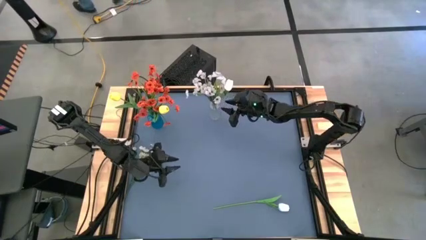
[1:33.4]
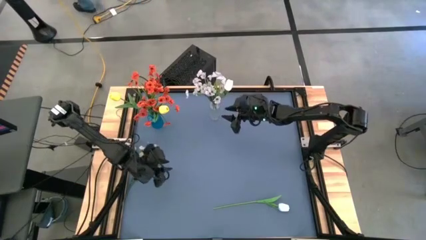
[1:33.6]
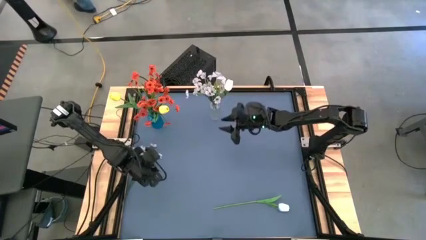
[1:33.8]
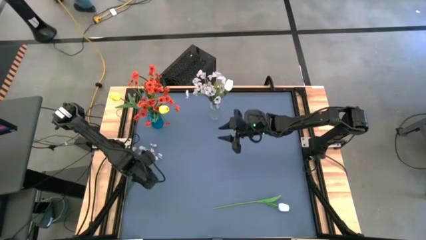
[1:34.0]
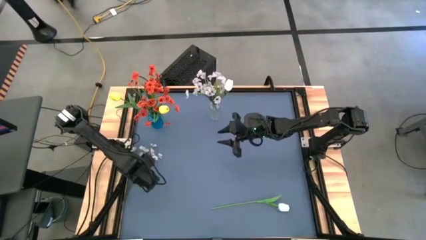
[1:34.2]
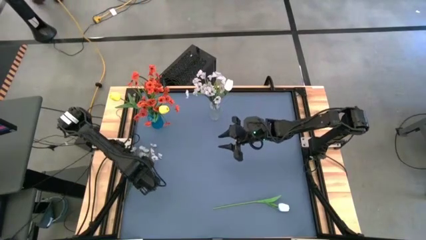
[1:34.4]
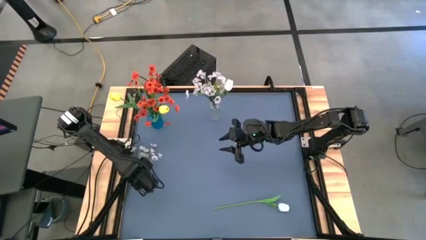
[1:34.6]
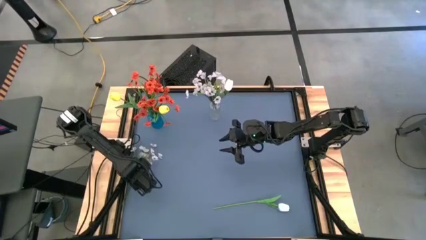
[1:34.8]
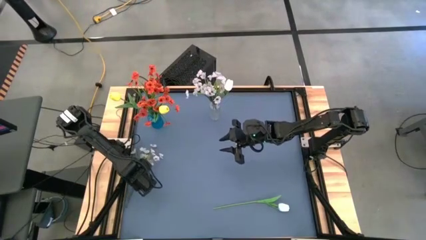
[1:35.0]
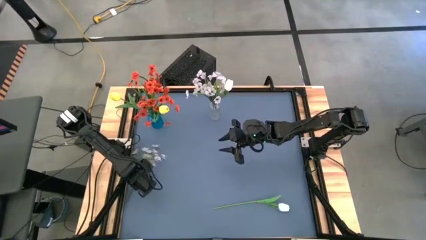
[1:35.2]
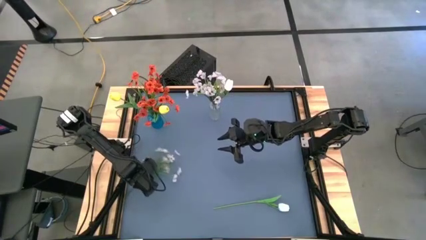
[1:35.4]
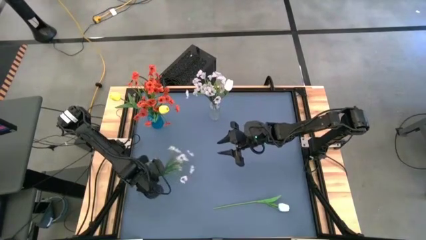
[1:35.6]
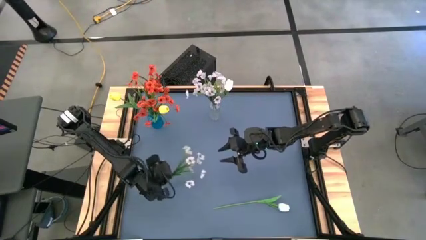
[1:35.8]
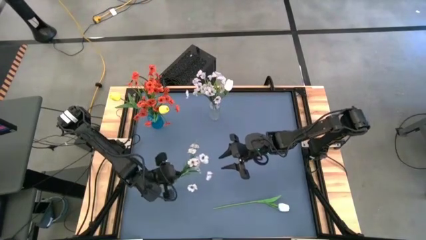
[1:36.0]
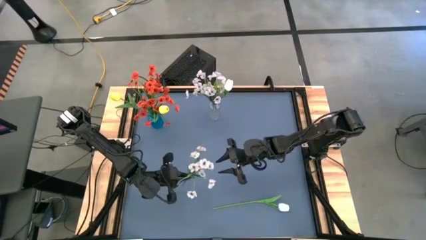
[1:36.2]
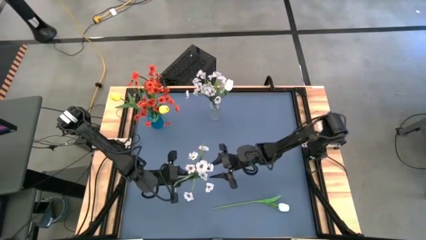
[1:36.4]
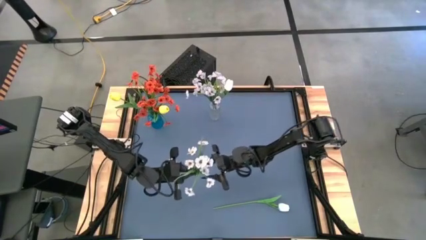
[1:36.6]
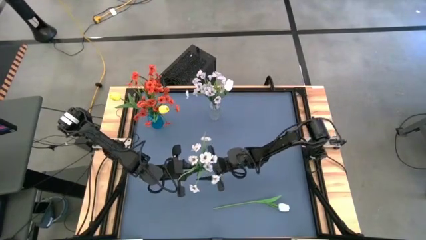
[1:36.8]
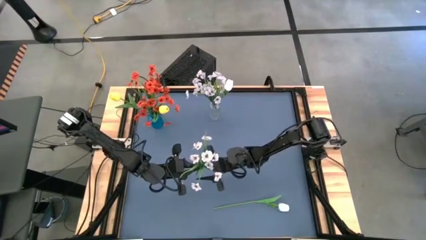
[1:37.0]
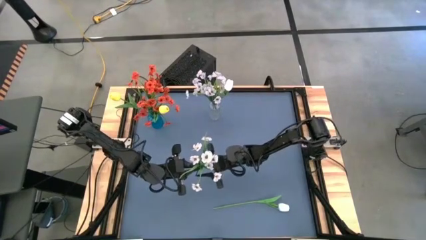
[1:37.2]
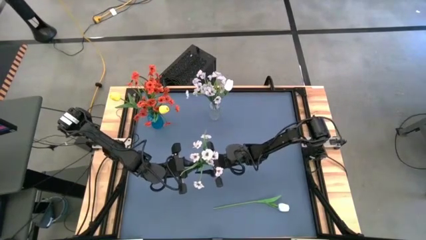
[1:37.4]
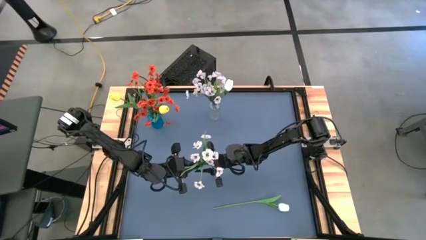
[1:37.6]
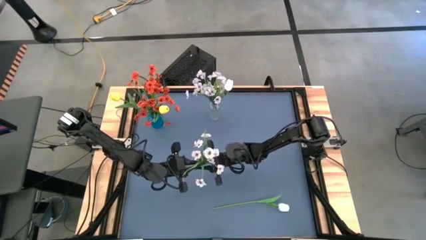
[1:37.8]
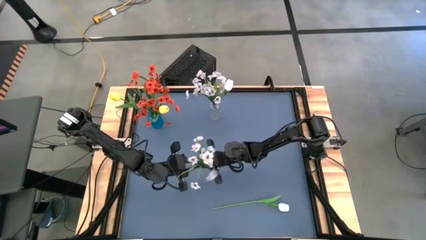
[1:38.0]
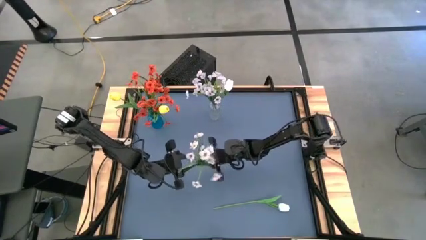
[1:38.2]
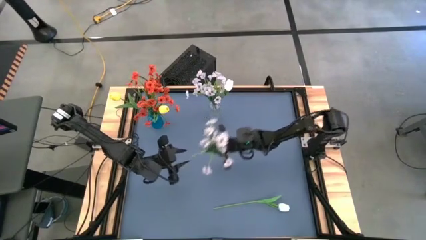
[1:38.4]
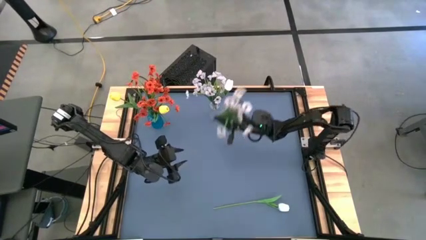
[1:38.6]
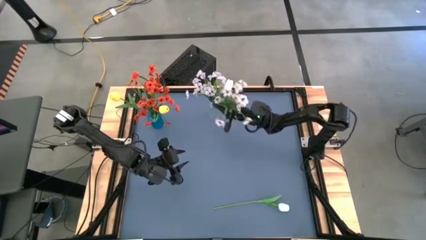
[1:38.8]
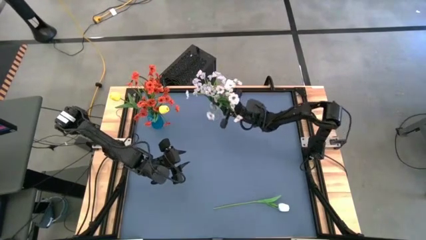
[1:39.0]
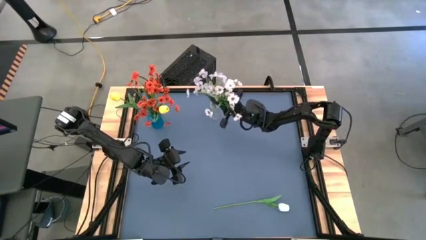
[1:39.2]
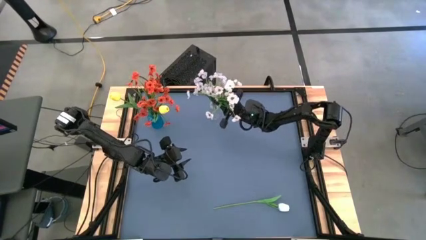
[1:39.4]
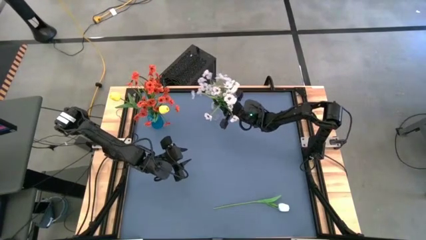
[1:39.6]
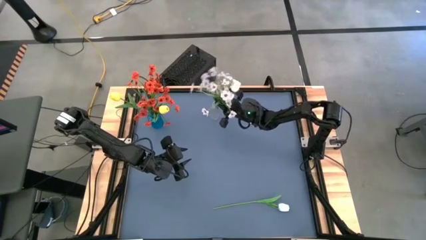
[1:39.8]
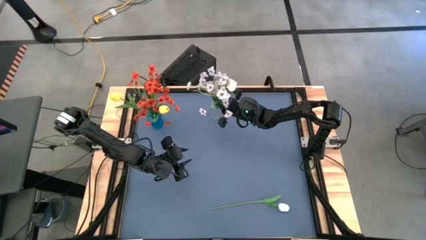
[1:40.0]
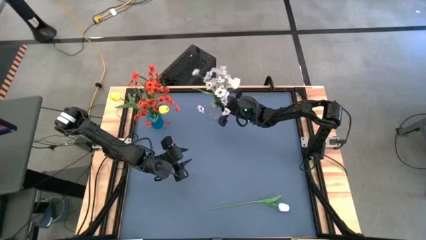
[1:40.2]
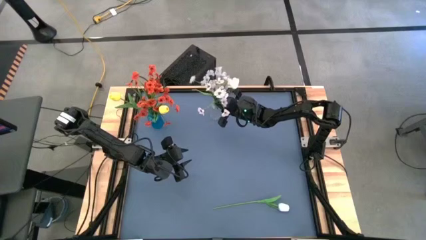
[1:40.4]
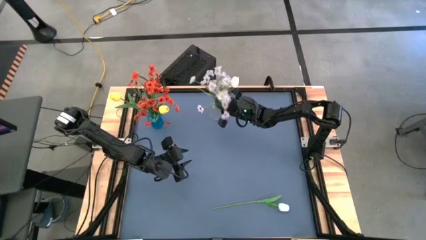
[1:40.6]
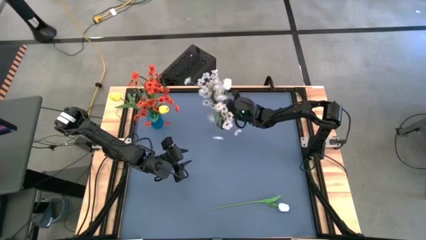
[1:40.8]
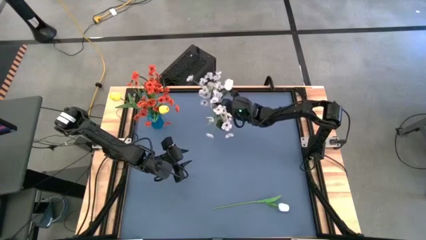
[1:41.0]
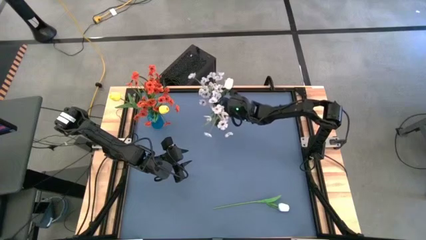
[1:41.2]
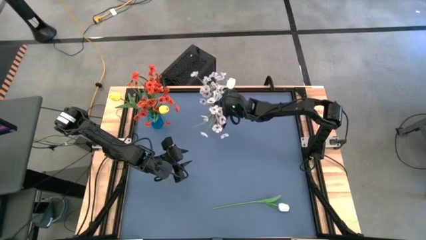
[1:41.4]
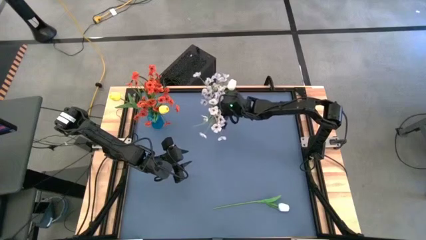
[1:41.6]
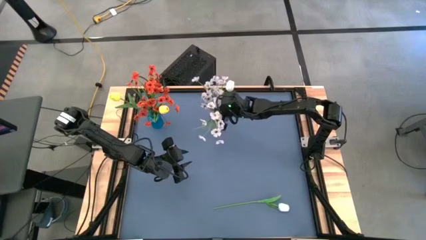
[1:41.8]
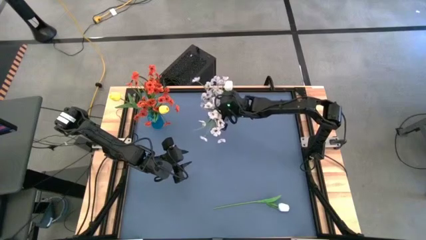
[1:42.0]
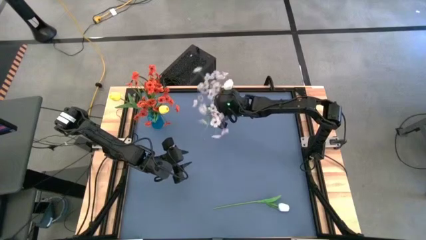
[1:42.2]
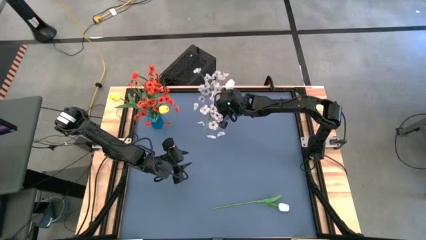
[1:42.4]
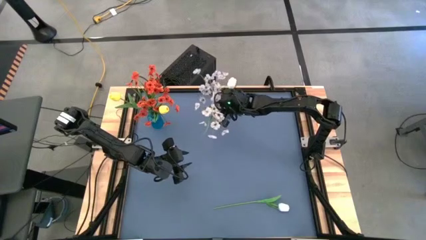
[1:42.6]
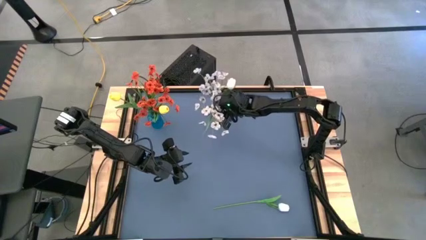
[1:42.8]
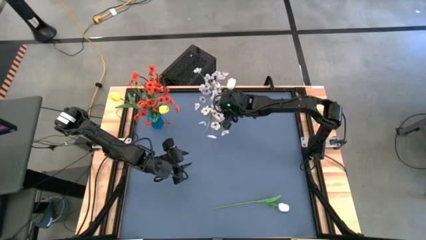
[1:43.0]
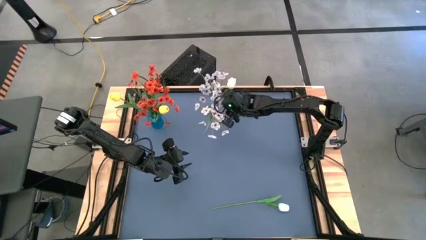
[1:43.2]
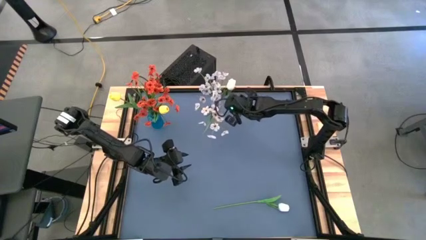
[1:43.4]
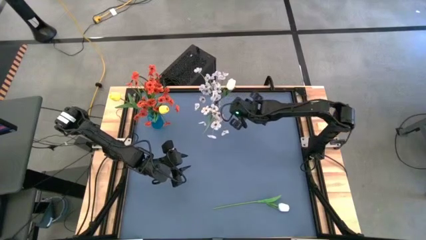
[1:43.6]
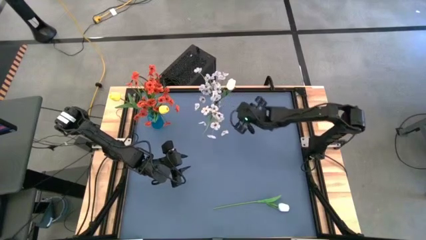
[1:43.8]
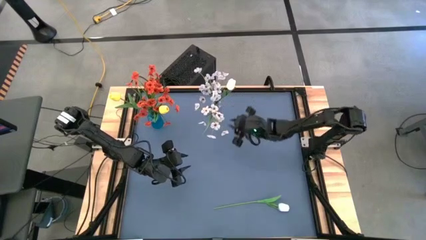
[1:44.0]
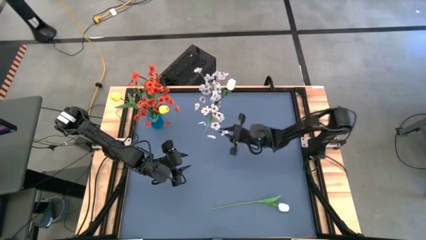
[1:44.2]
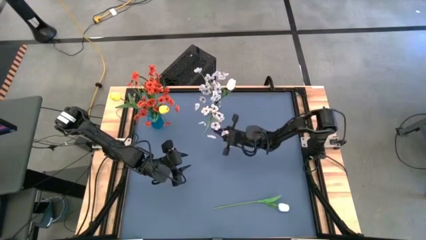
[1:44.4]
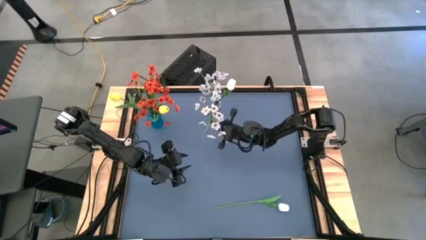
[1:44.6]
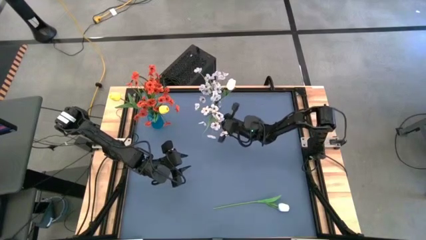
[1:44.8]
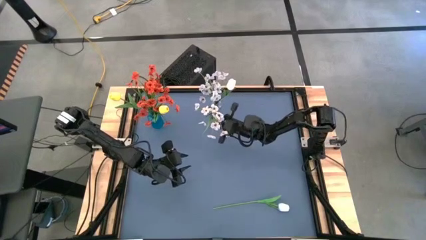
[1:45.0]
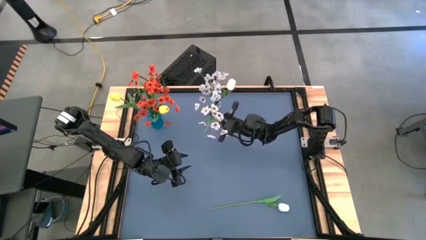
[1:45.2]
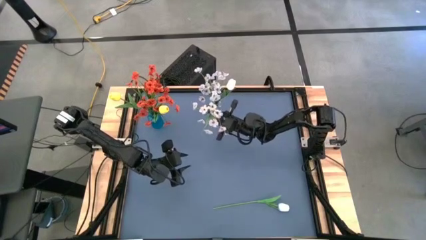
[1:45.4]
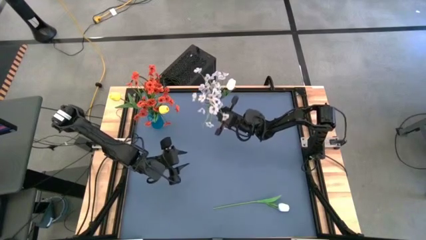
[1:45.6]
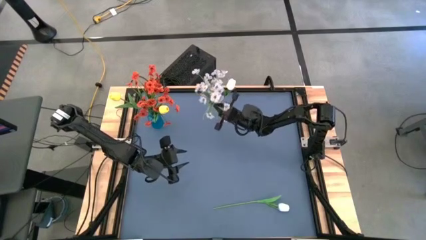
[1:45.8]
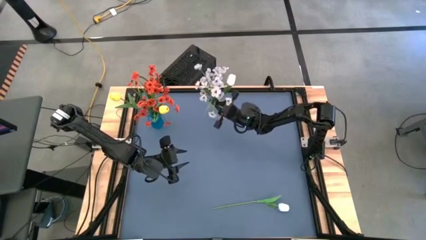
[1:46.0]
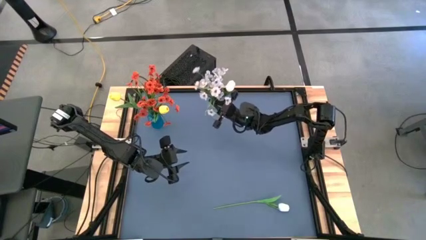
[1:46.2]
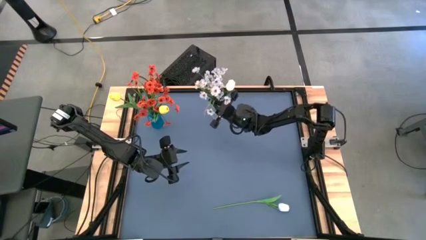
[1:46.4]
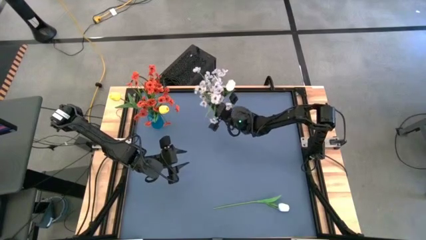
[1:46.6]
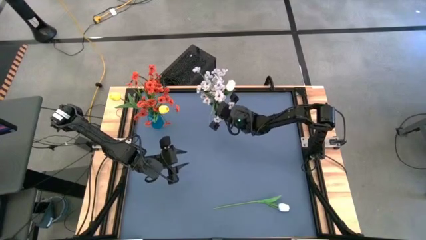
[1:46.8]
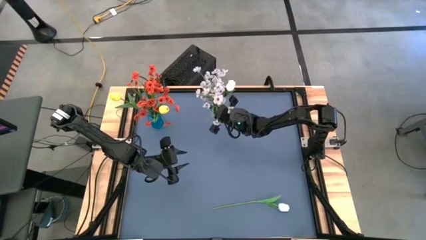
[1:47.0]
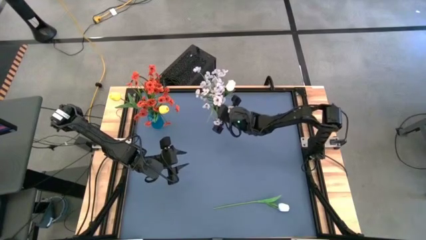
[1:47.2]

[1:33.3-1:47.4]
Task: Sort flowers into vase by color
Put the white flowers into the transparent vase
